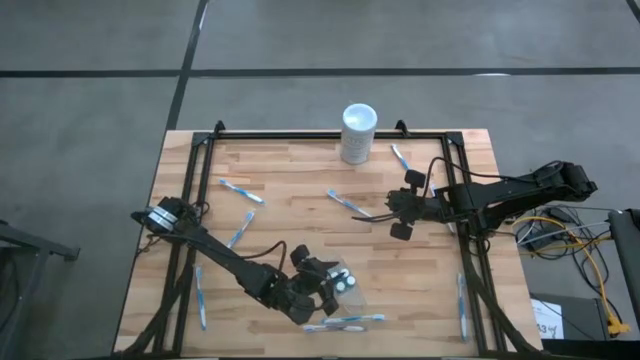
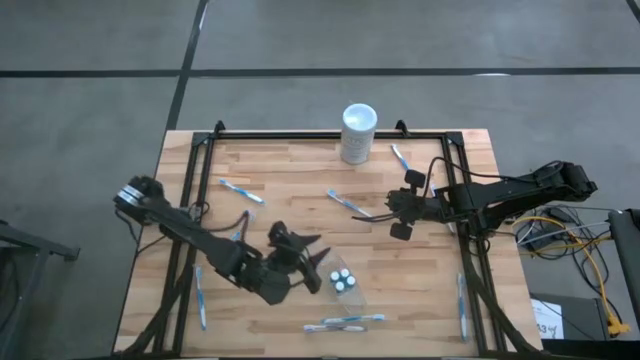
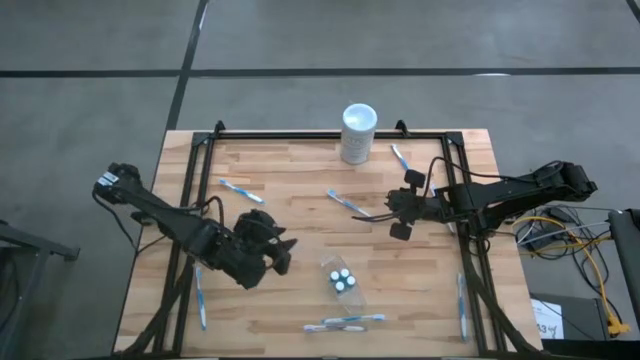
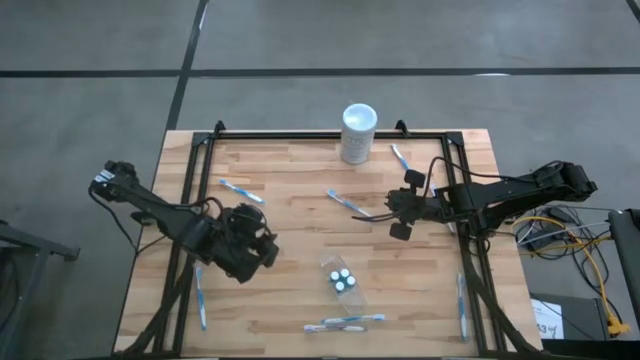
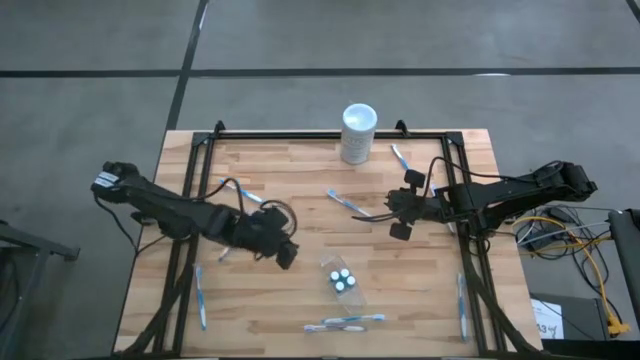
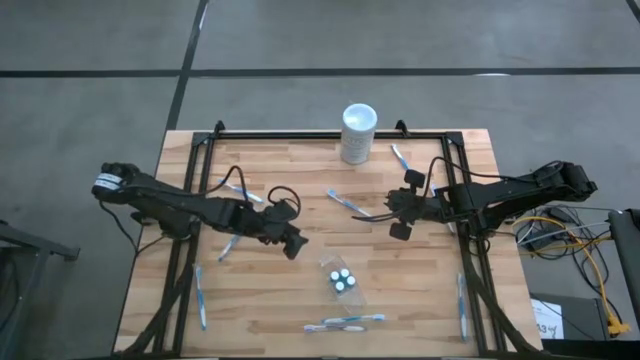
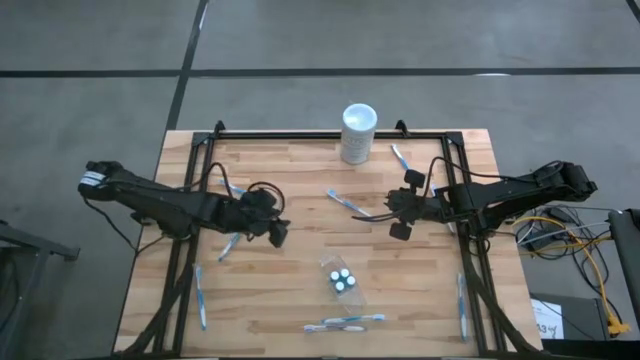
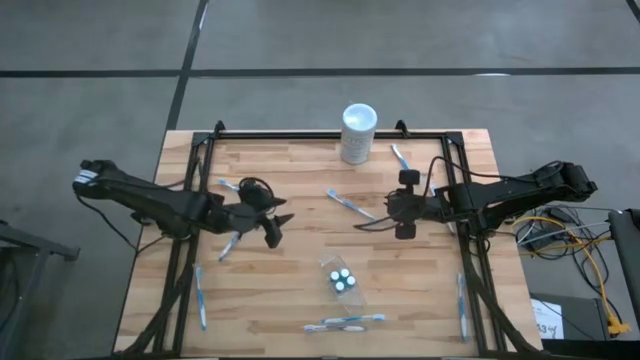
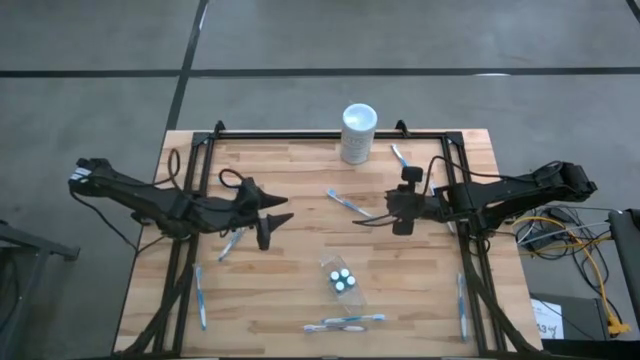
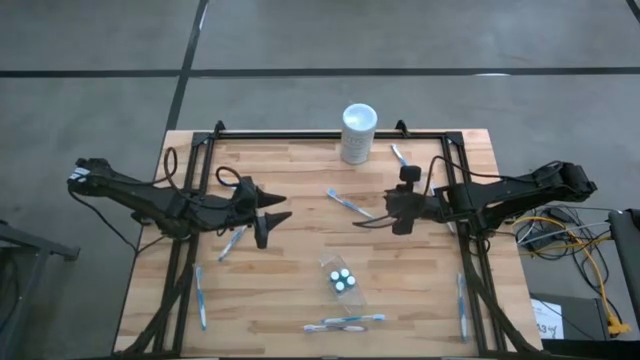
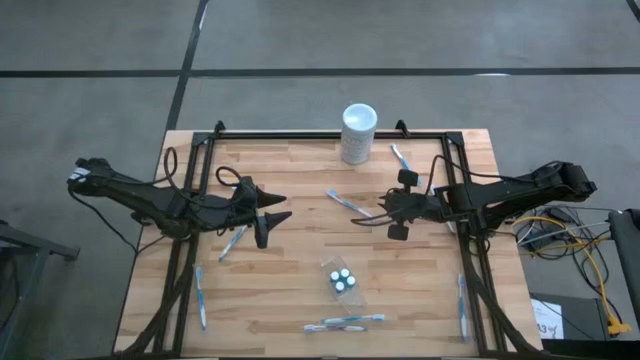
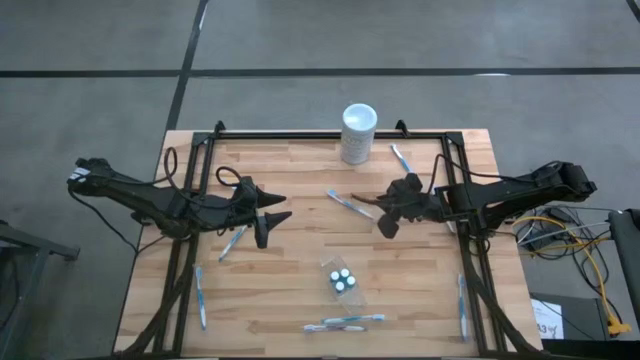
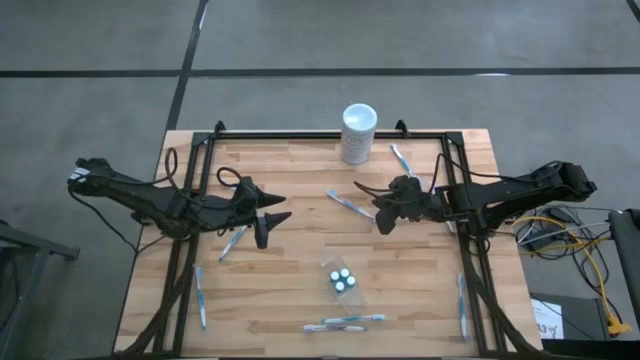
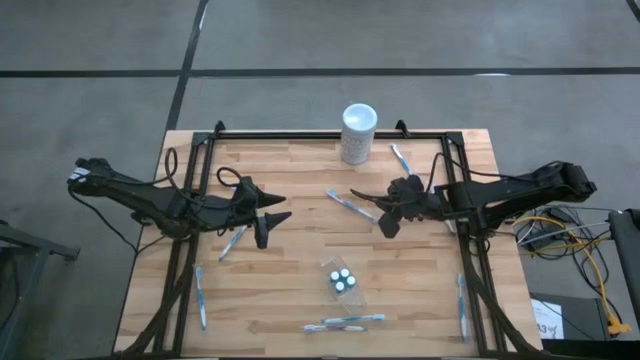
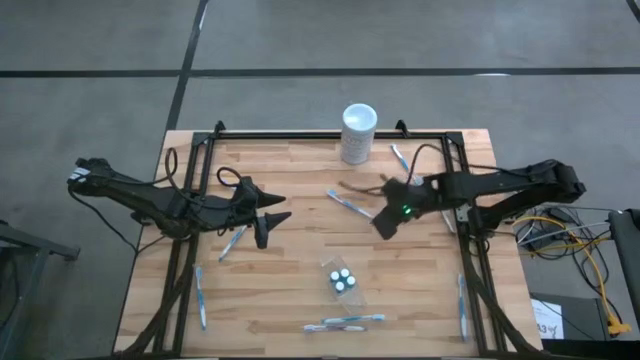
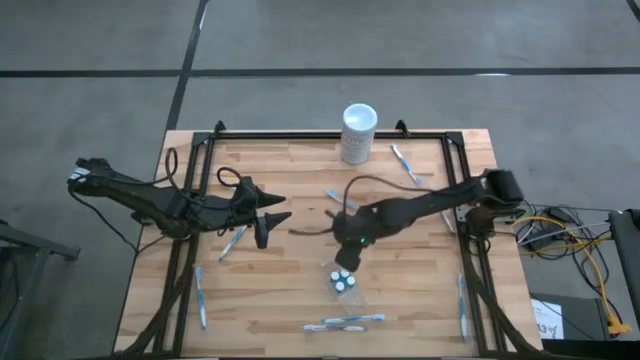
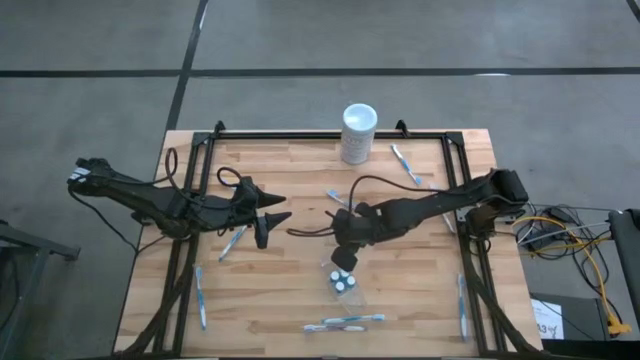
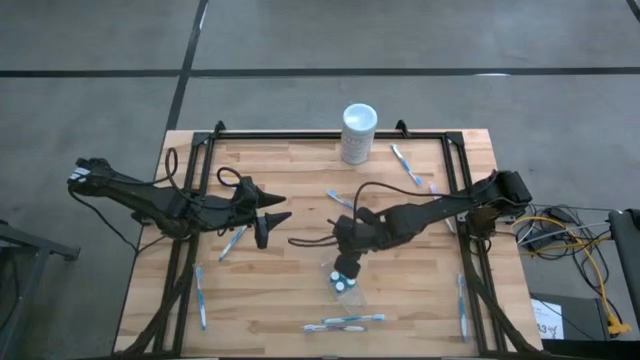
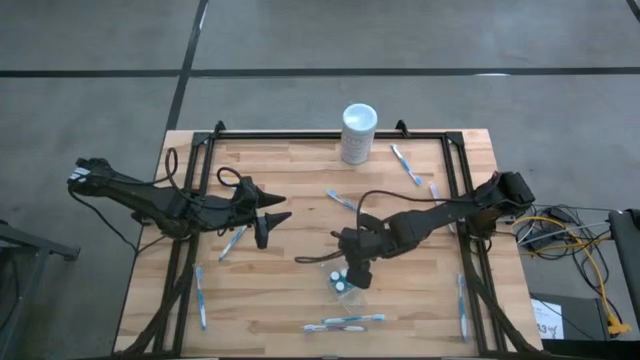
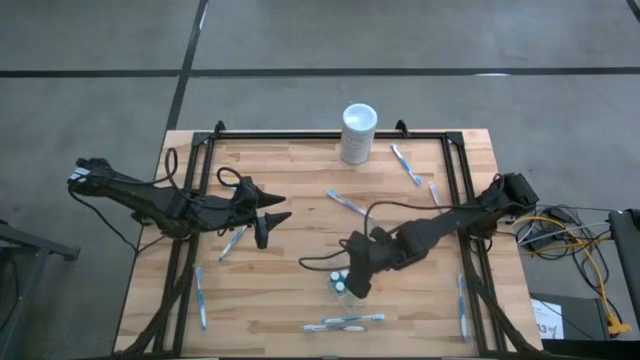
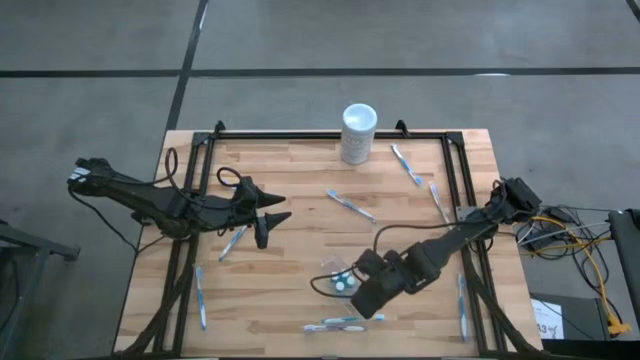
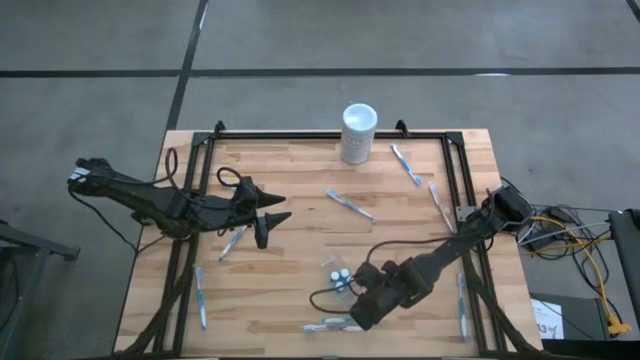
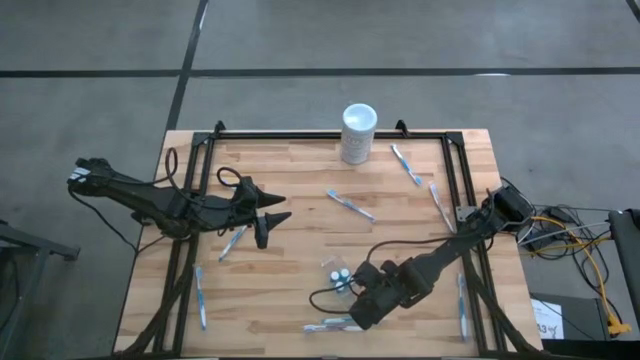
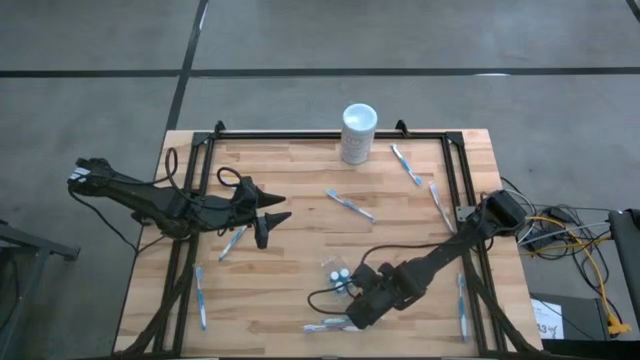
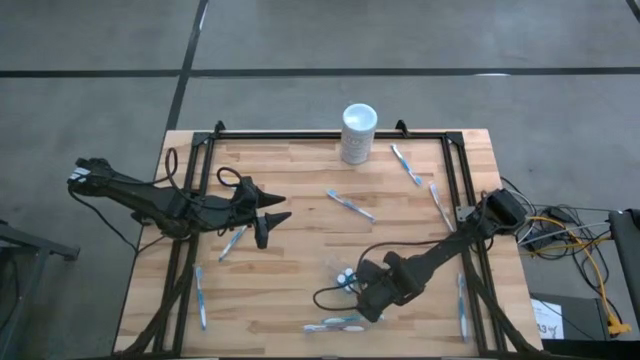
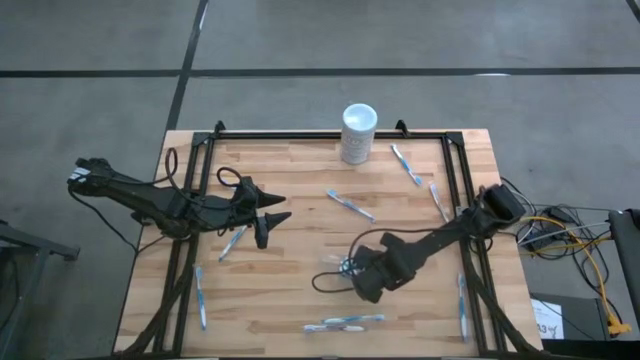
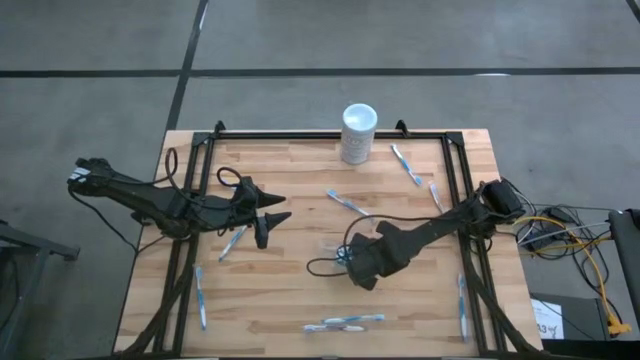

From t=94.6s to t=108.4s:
Task: Pick & Place toothbrushing station
Adjust the transparent organizer on the table

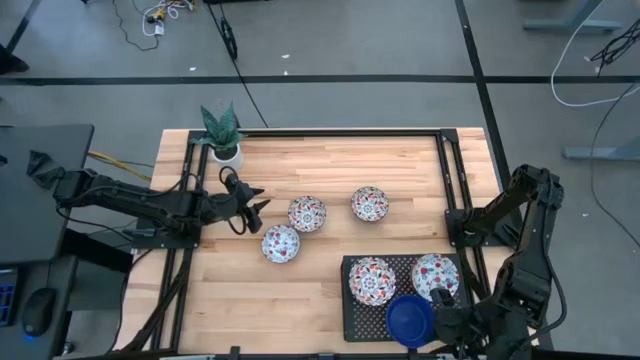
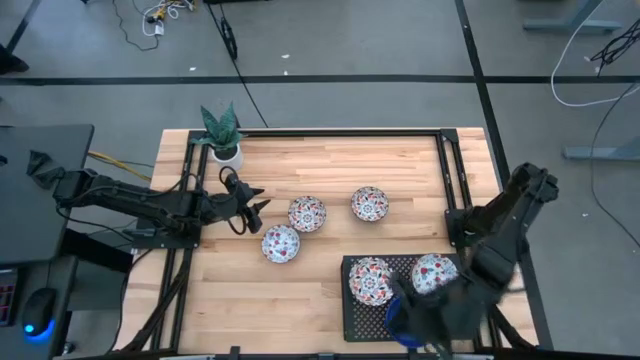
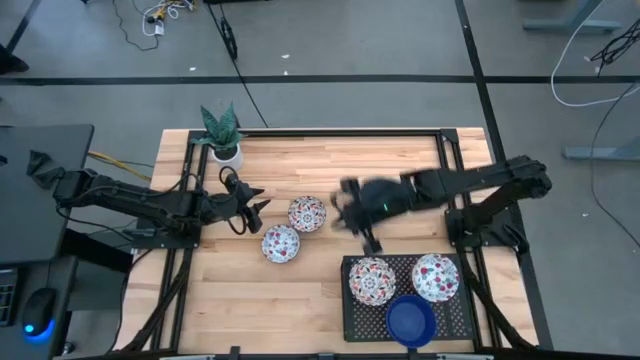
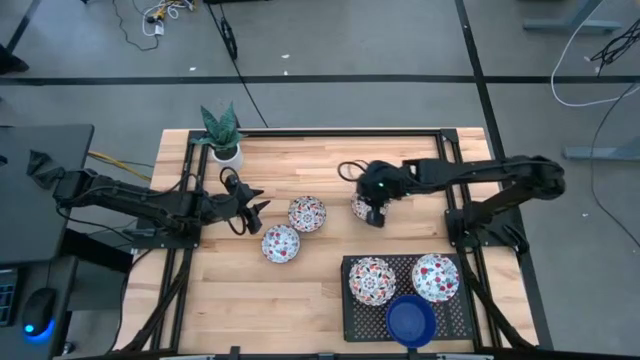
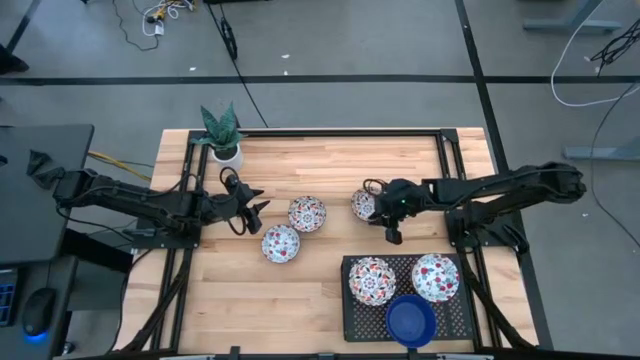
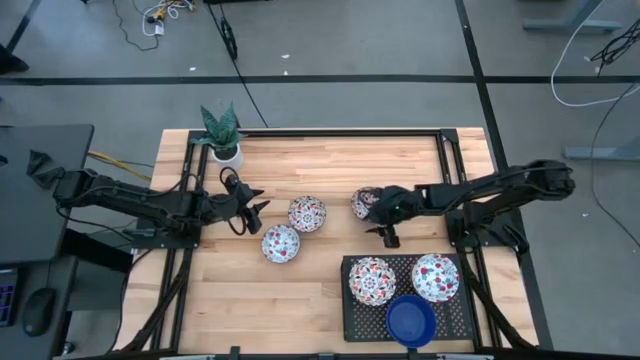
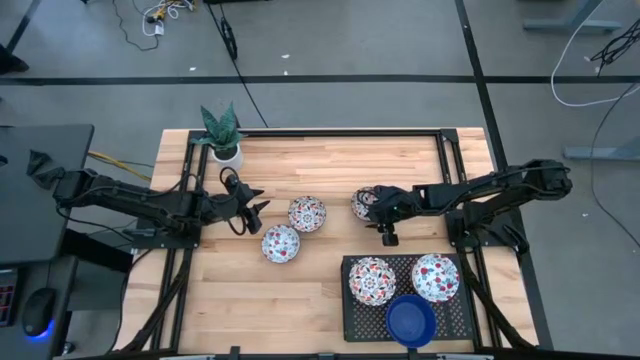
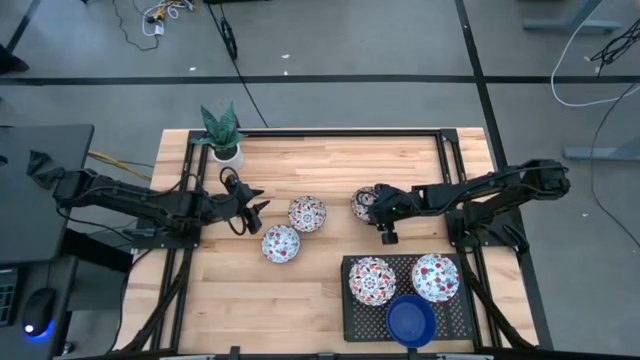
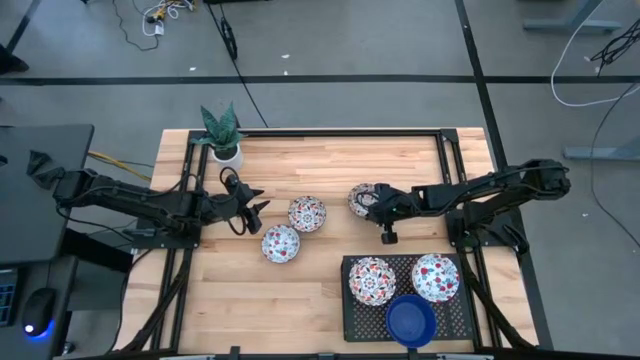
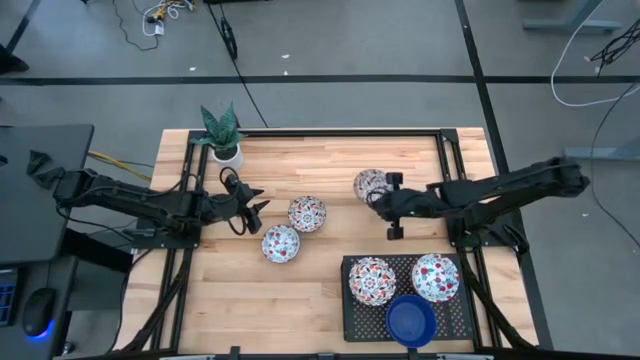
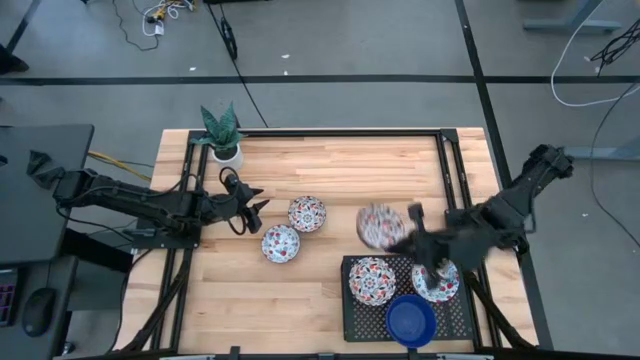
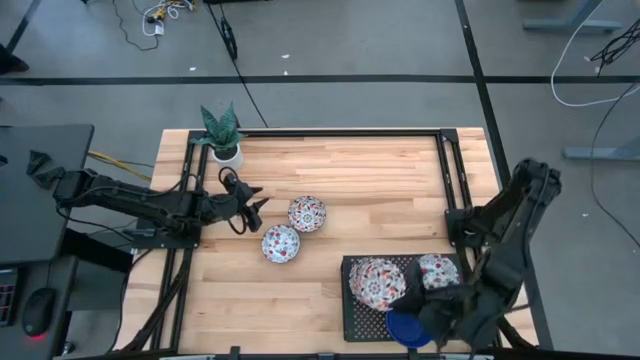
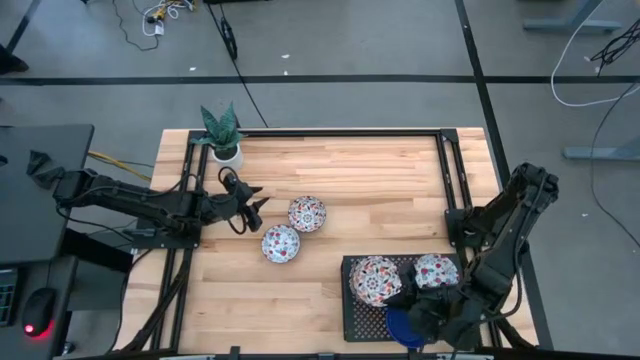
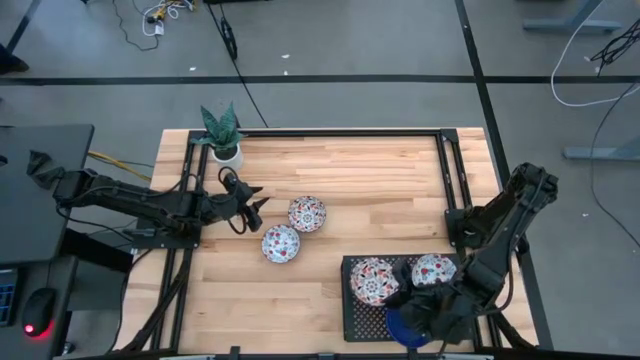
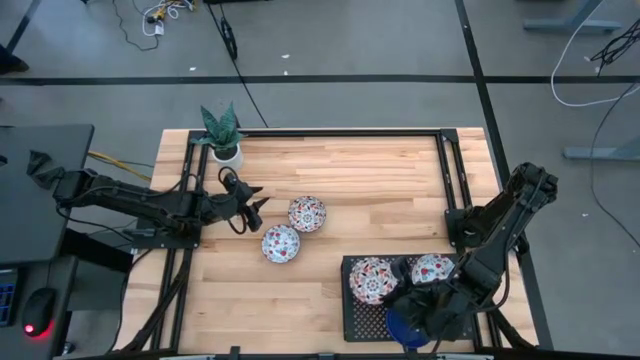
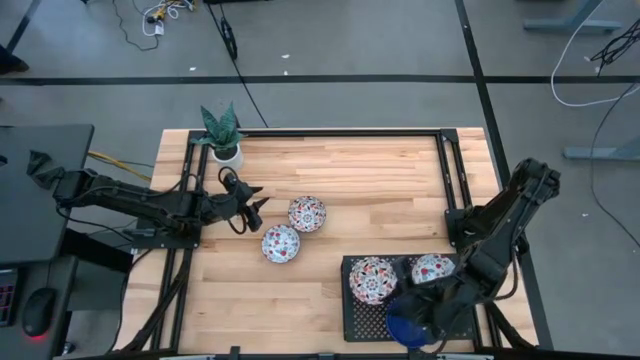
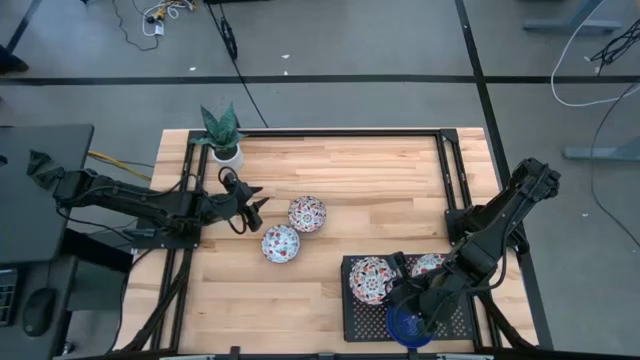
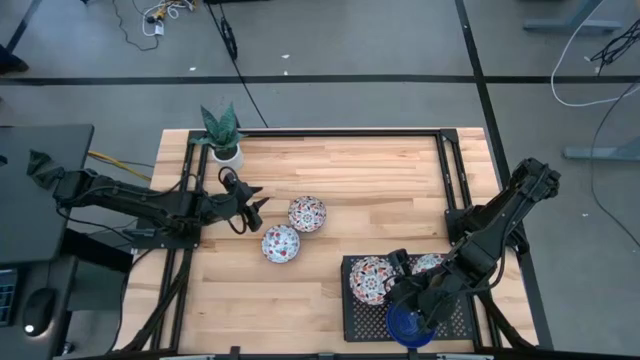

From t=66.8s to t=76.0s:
Task: Pick & Place Mini bowls
Stack the right orange patterned bowl on top of the orange patterned bowl on the shelf
